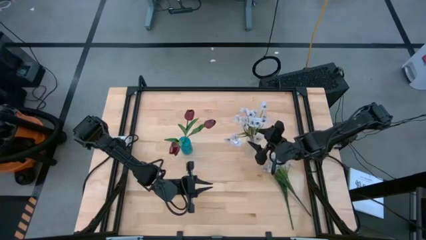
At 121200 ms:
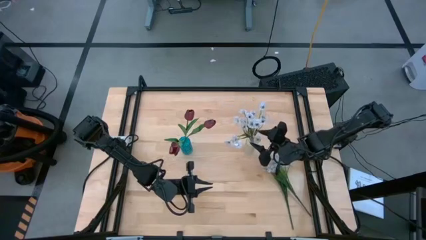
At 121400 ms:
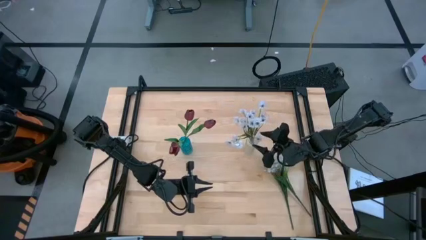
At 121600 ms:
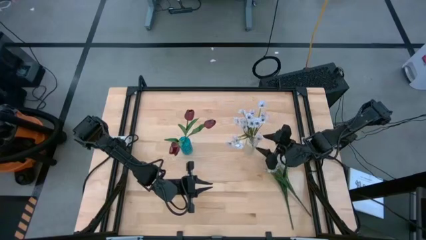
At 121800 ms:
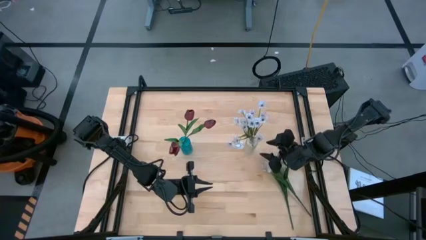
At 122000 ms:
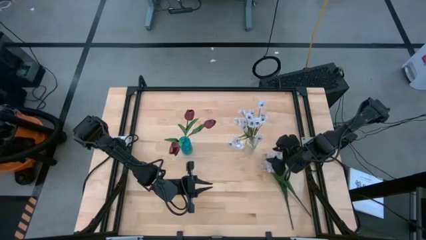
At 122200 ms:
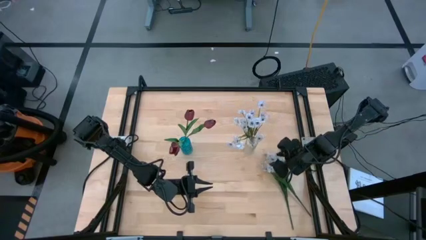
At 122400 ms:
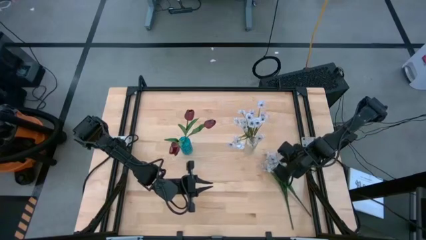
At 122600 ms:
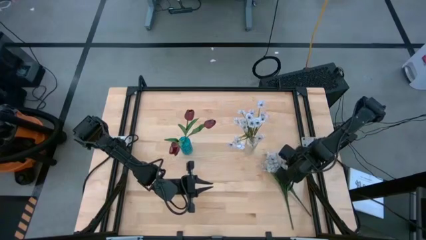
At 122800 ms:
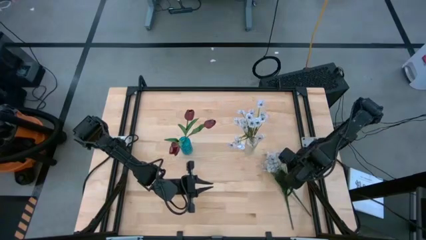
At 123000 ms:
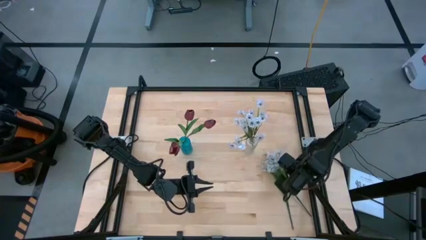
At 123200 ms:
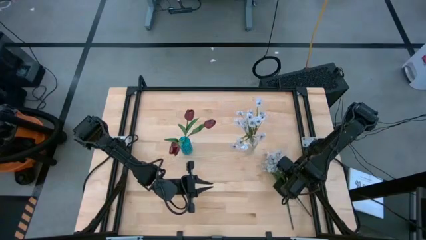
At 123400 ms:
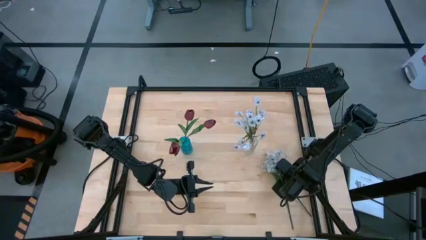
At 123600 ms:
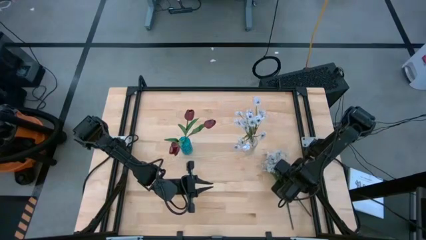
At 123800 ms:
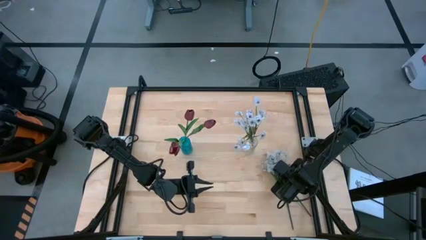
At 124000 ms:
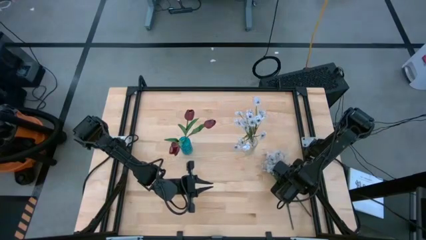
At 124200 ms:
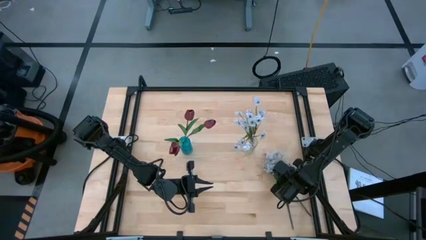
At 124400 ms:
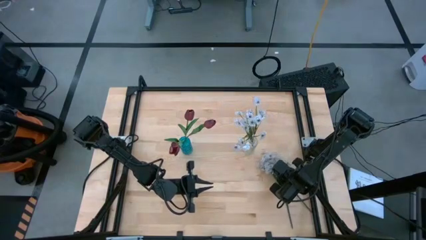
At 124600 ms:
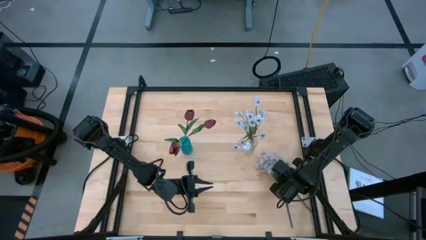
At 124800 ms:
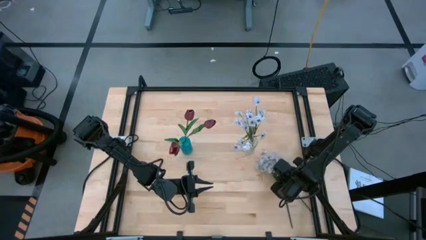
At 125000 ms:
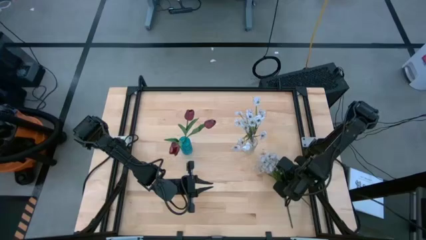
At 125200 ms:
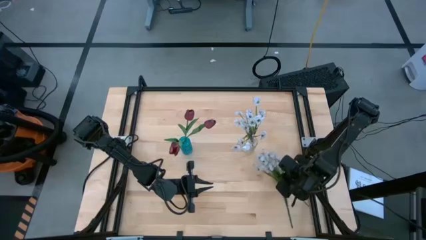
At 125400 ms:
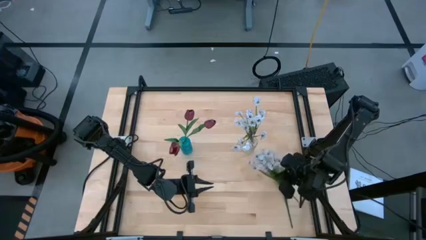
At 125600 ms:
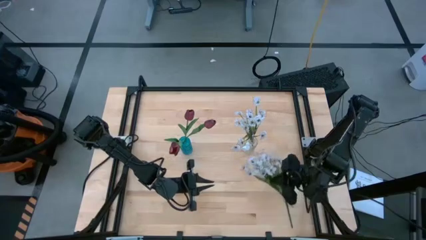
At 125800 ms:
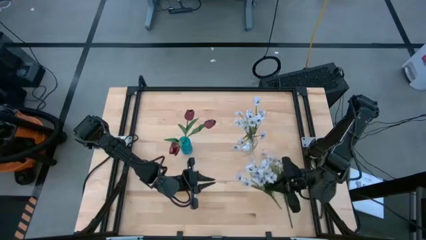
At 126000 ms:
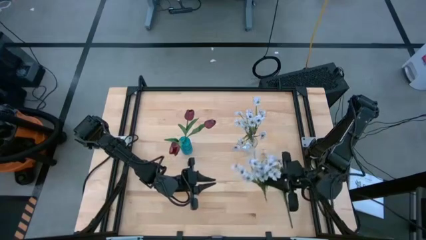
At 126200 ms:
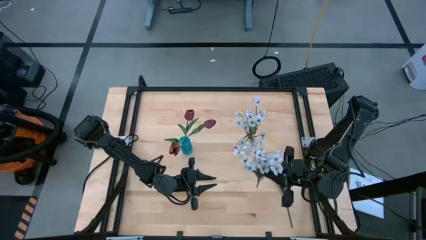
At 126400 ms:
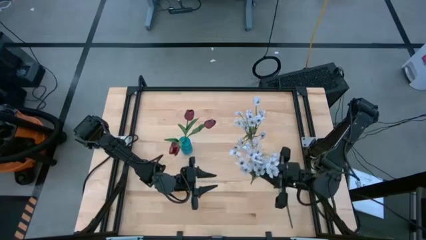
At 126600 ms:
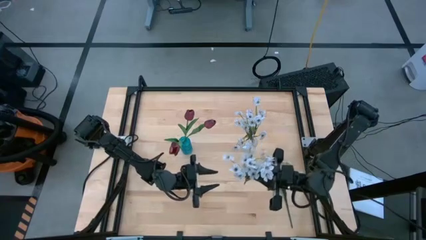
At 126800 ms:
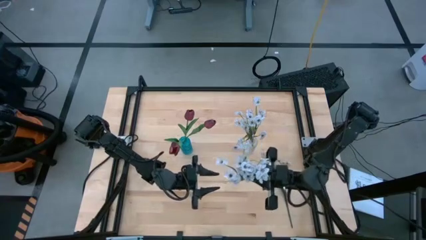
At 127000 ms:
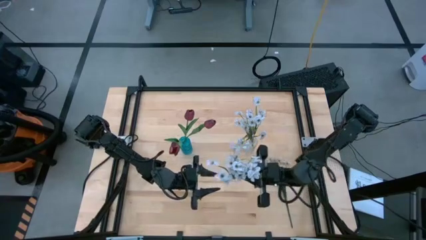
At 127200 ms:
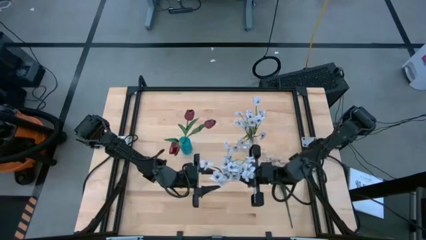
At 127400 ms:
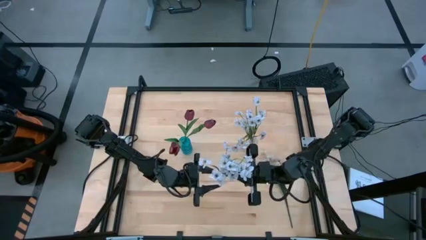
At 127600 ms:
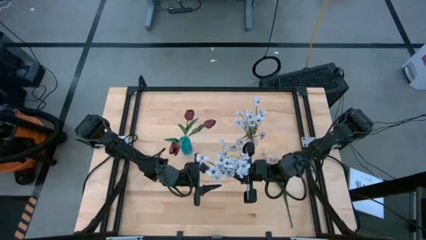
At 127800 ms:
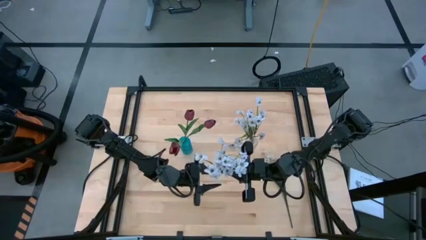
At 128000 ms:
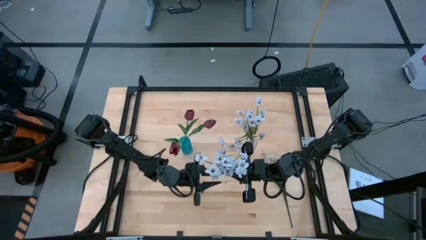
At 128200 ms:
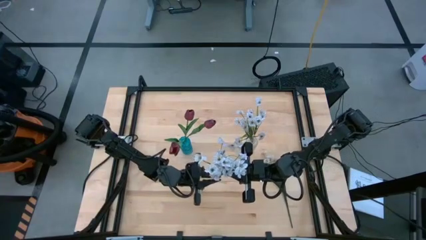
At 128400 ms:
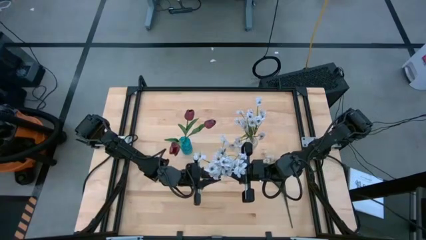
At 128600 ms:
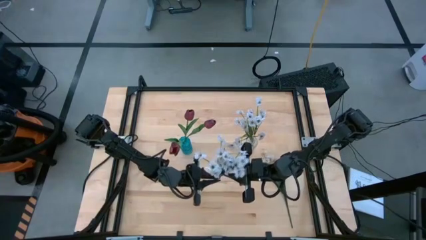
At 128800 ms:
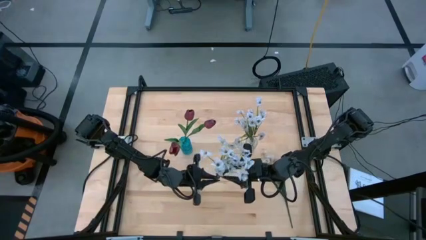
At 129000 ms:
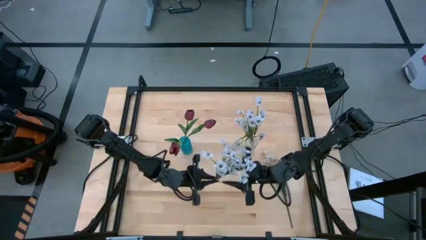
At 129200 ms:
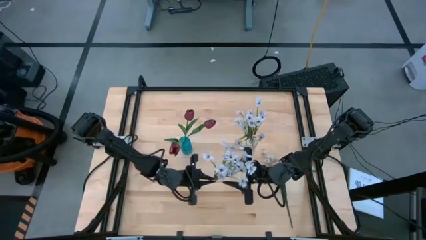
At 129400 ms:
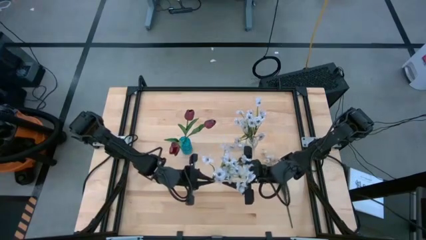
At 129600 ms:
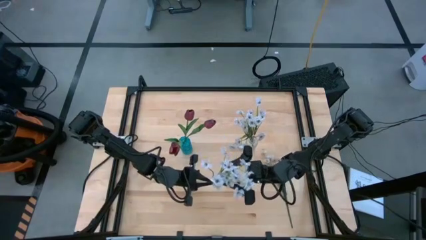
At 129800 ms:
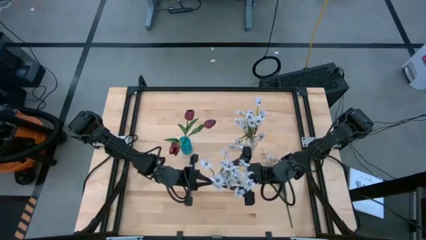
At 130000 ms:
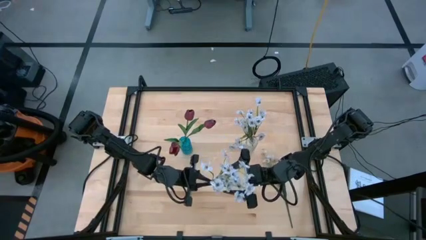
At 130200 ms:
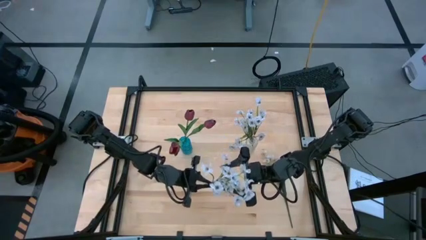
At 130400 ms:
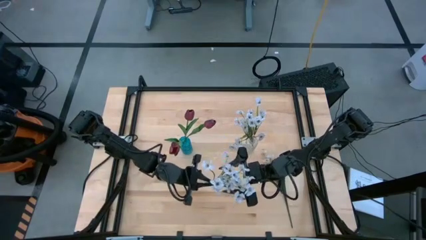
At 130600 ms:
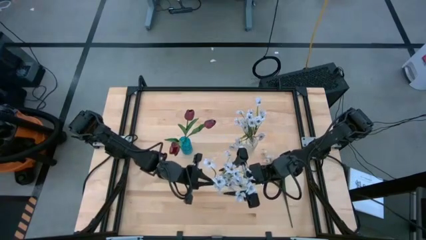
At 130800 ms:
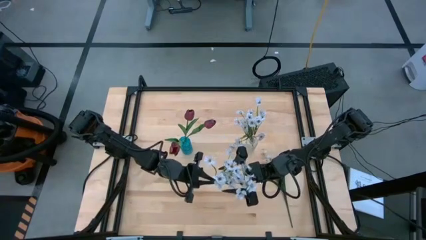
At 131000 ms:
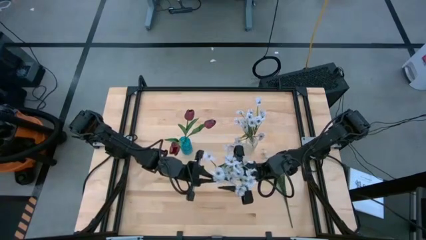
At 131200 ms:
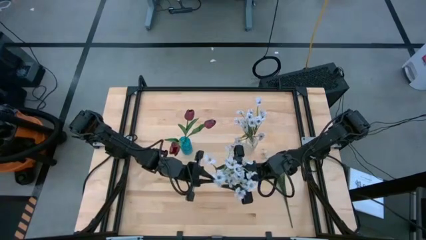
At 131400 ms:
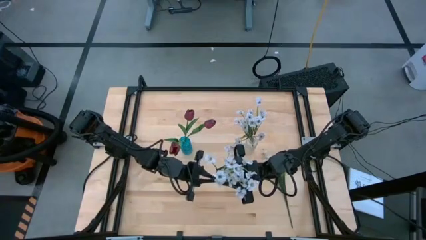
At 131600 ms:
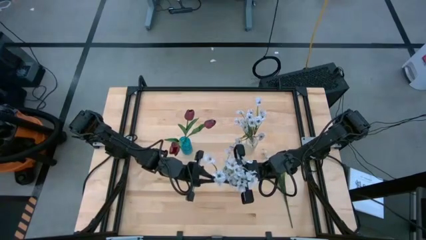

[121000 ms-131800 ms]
Task: Sort flowers into vase by color
Put the white daisies into the transparent vase

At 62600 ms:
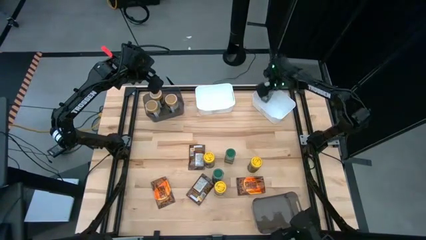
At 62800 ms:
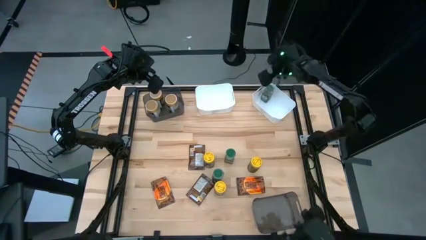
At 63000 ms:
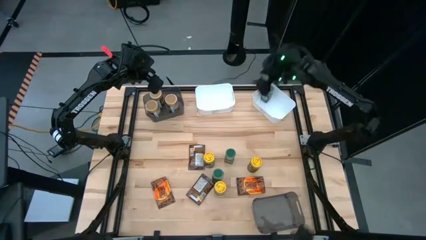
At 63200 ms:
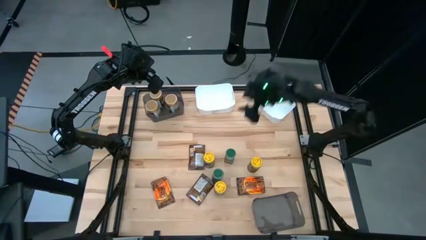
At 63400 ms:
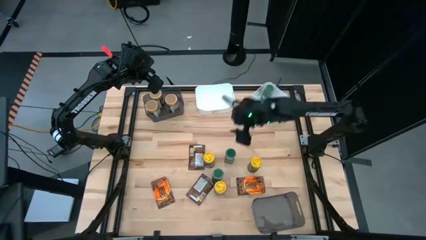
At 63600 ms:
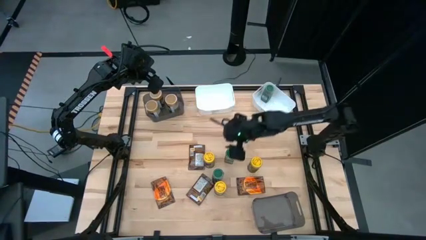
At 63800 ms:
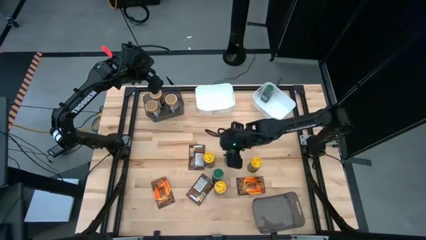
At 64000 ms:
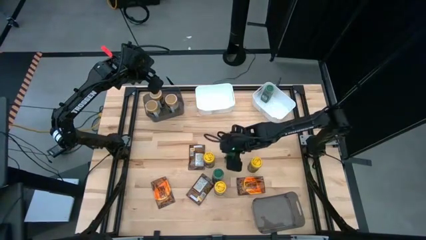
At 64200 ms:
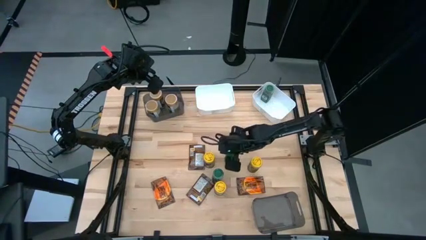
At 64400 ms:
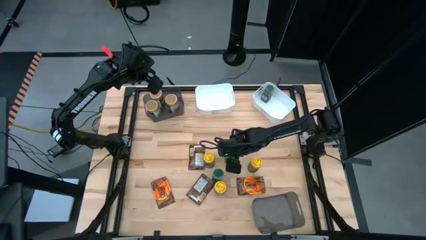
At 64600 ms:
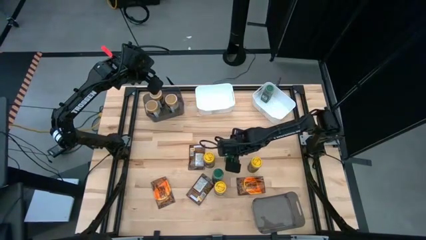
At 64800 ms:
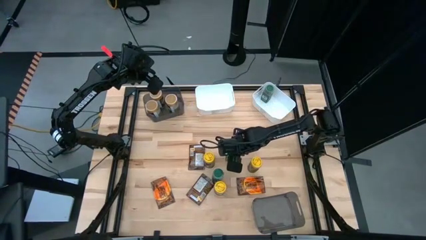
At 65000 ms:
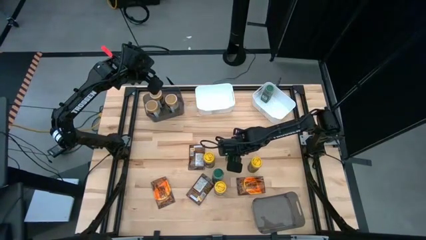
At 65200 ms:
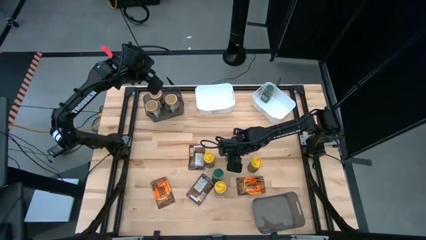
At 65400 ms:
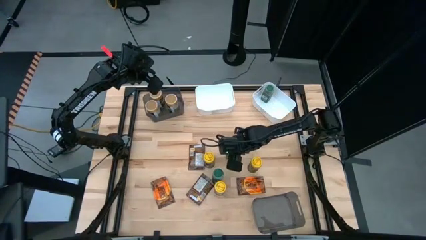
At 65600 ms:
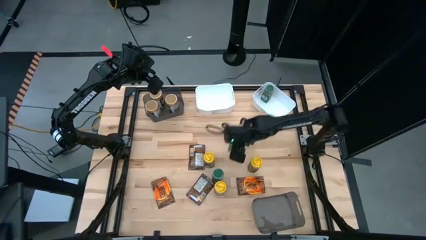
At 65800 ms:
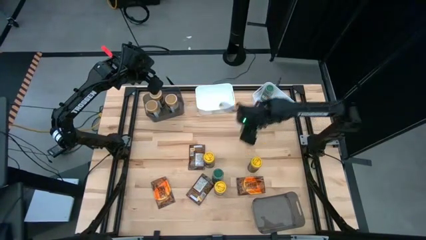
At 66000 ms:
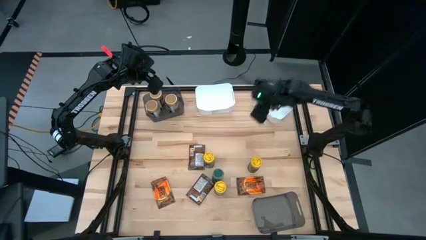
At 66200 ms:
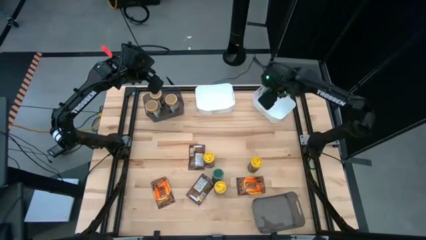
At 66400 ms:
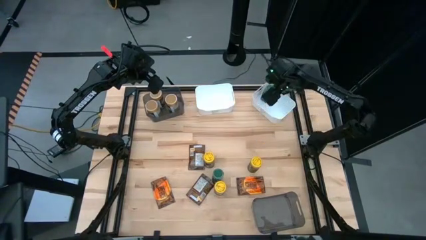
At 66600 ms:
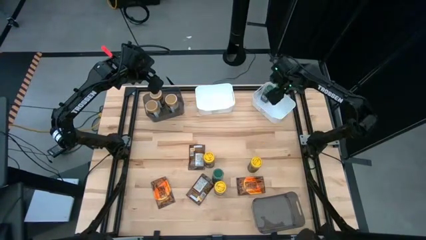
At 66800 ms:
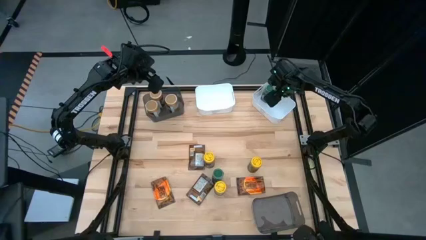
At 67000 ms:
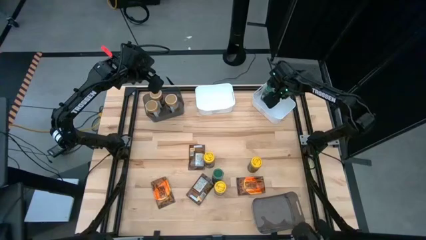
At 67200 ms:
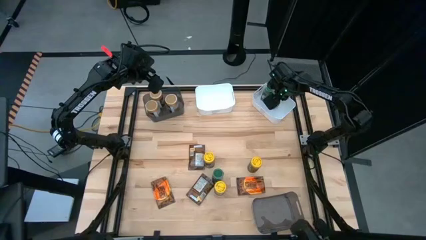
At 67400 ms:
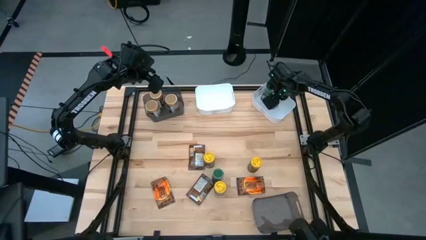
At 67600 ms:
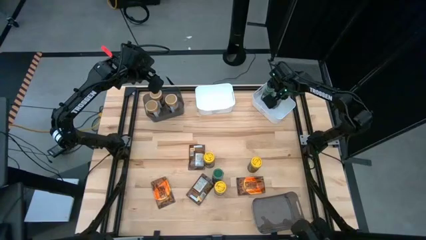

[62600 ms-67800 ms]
Task: Sort spices by type
Put the green seasoning bottle into the right white bin
